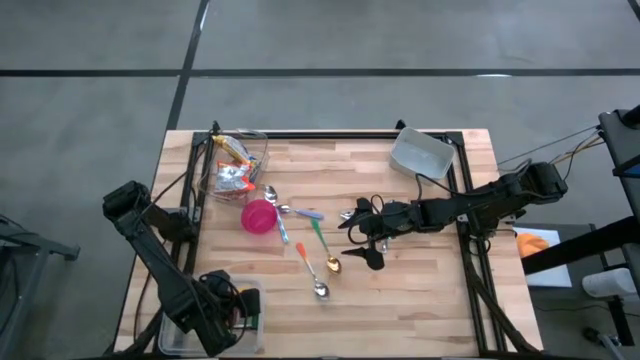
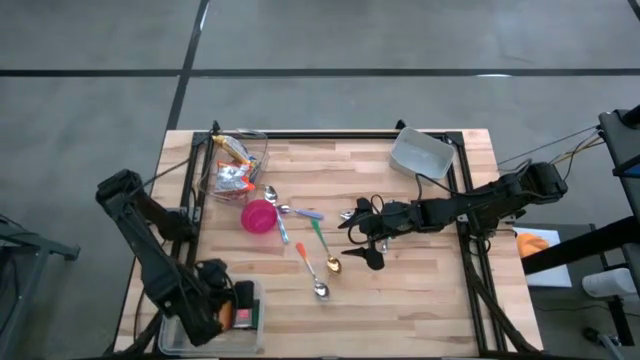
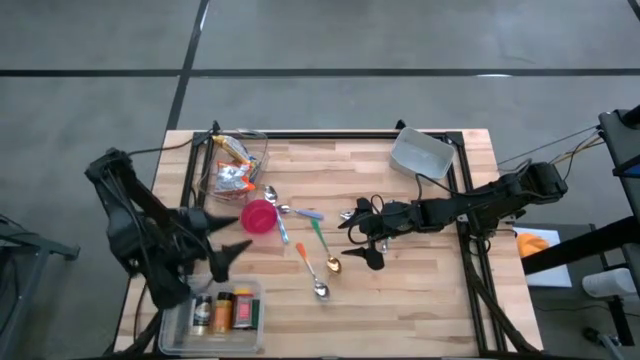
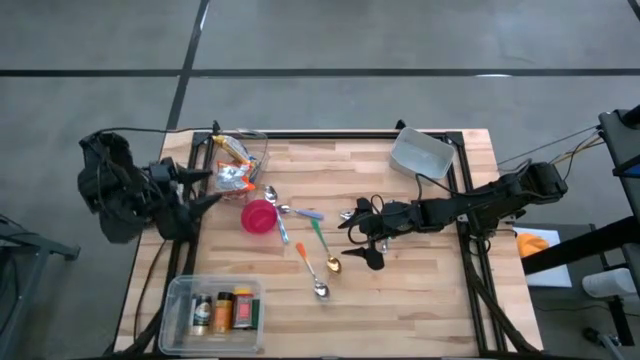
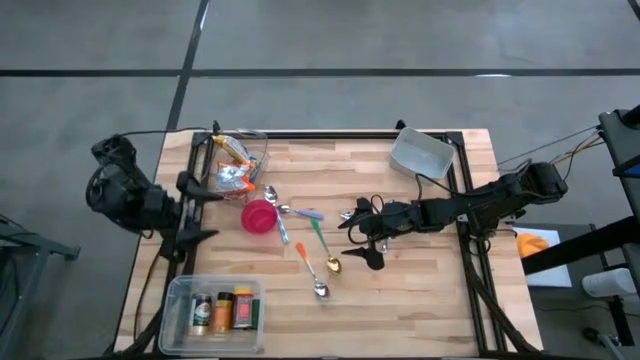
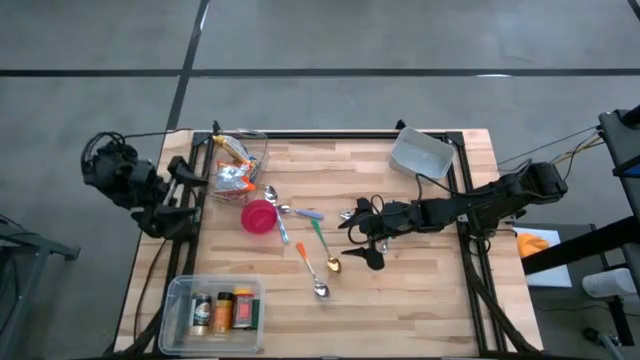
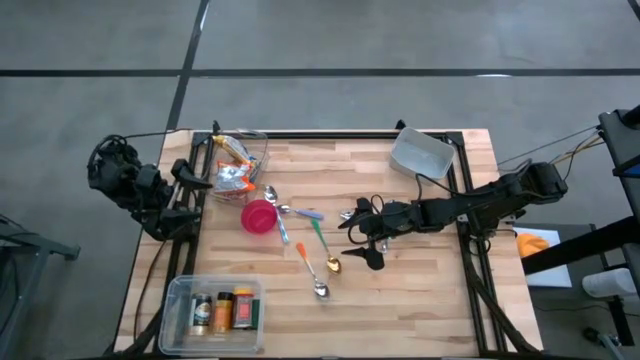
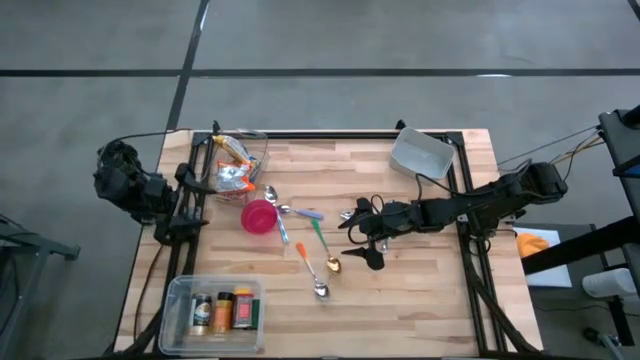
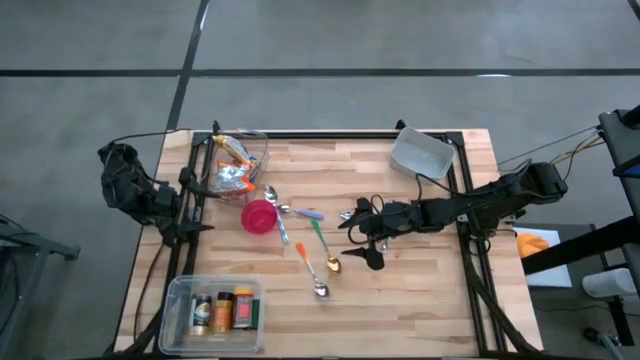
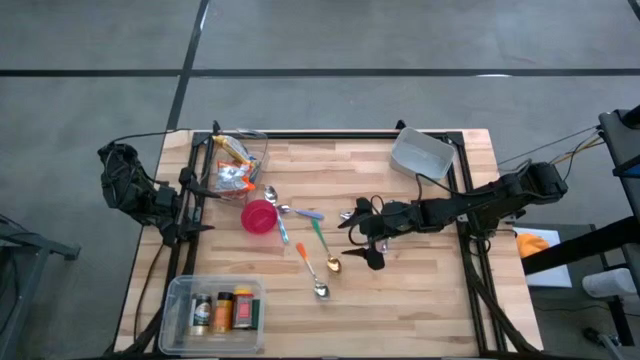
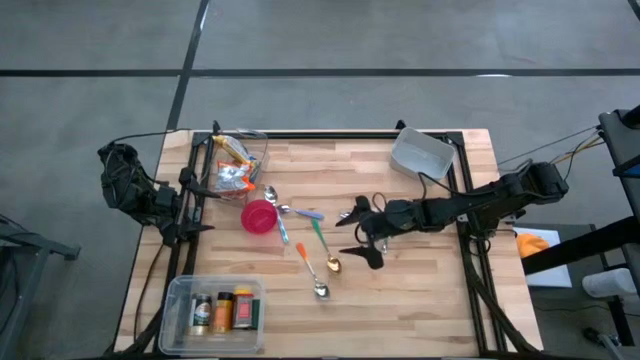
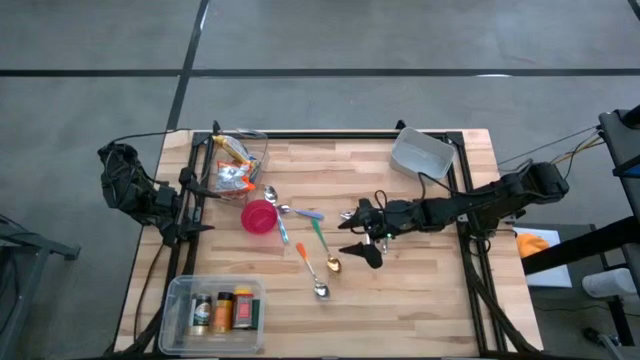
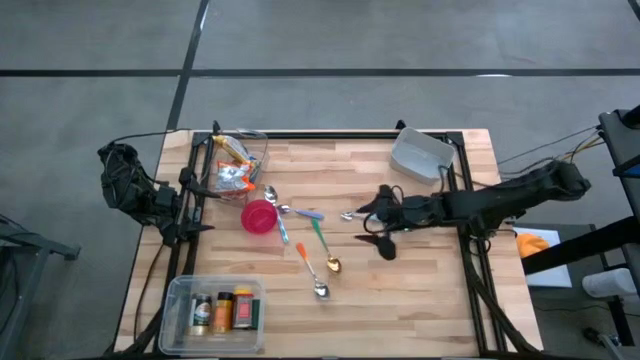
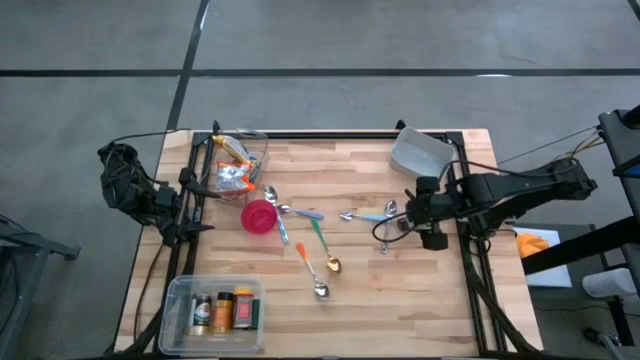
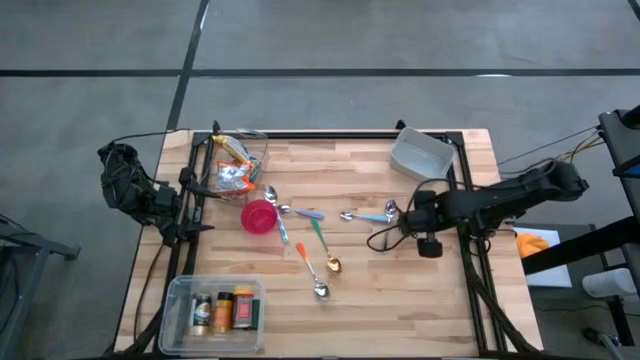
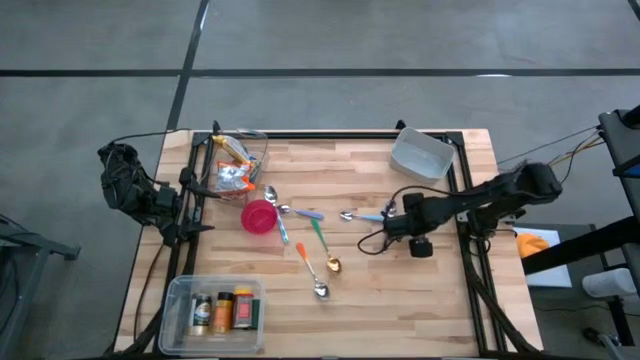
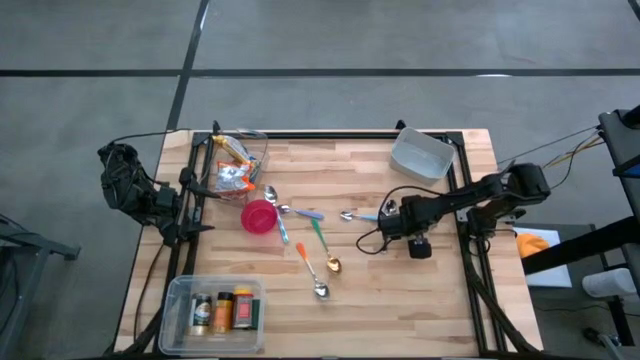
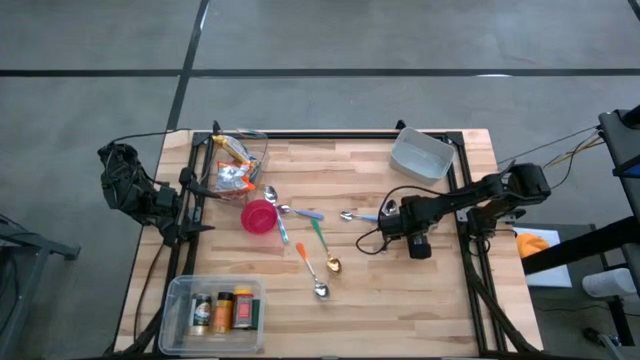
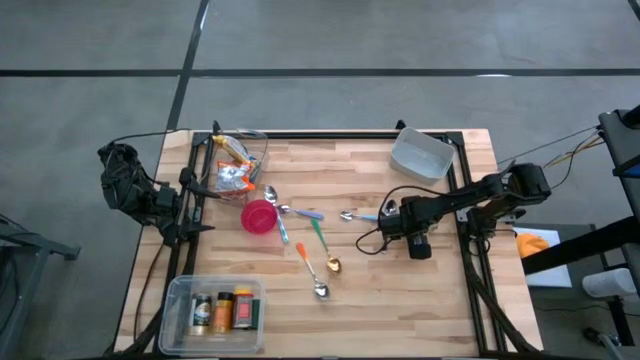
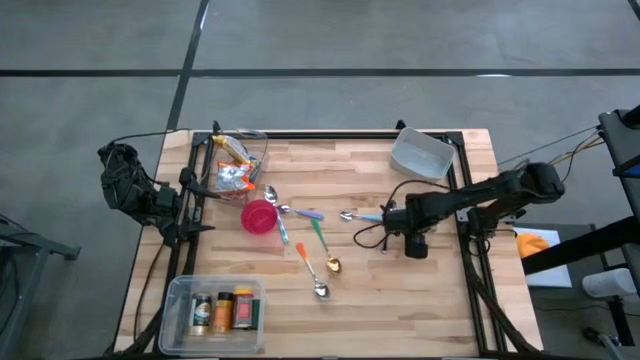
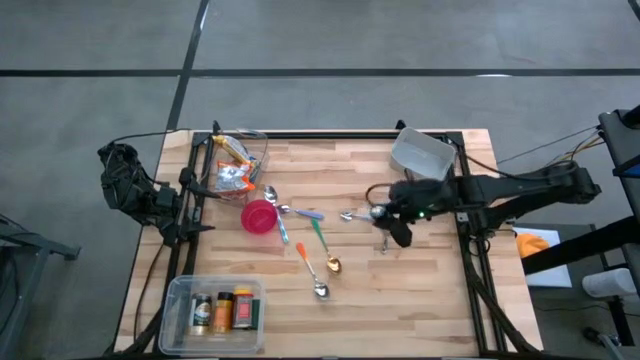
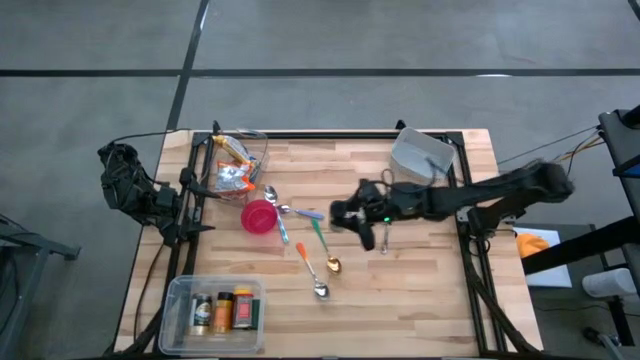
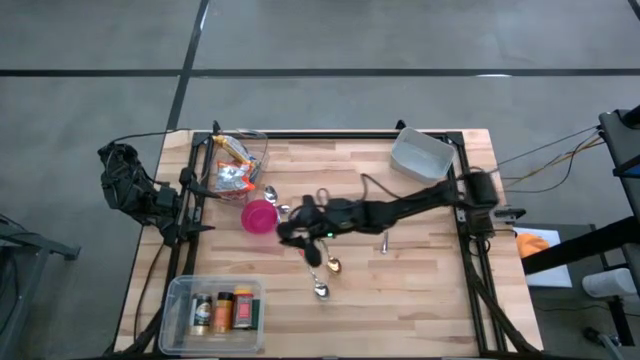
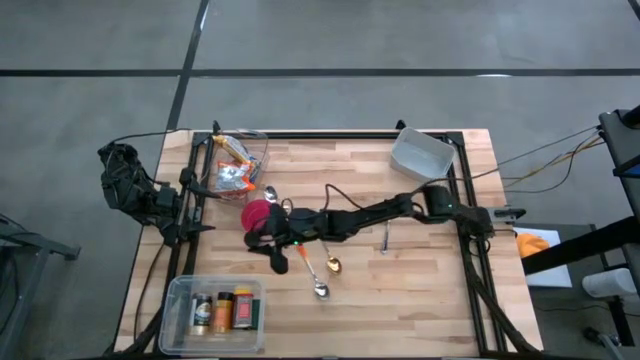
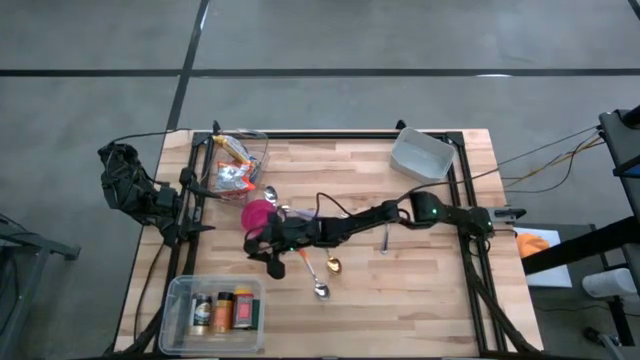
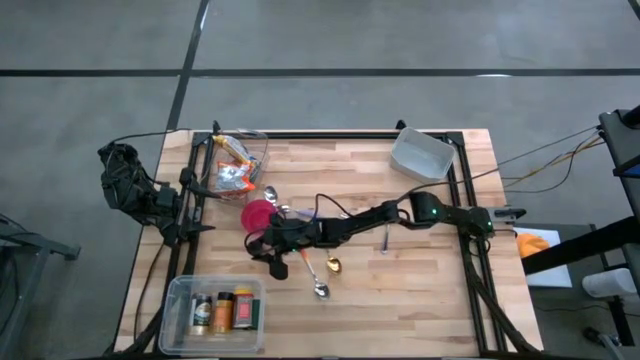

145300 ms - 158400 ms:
Put the black seasoning bottle into the white bin
